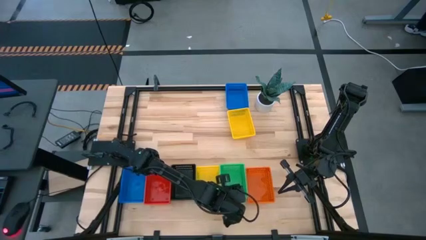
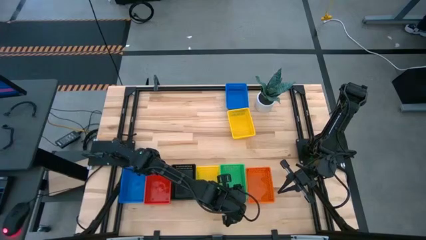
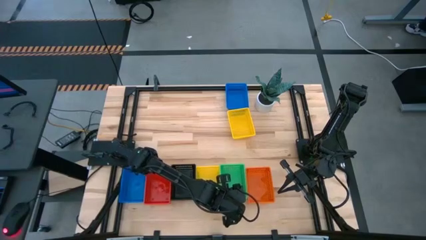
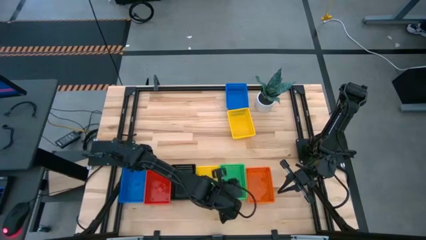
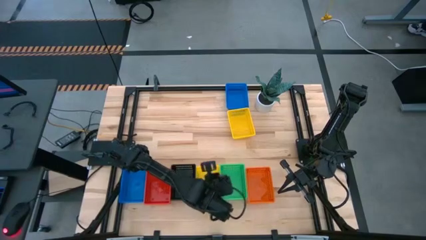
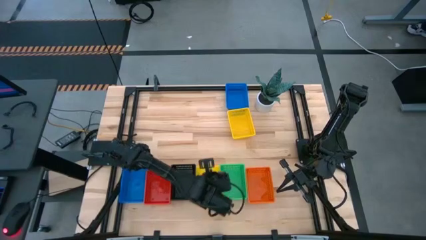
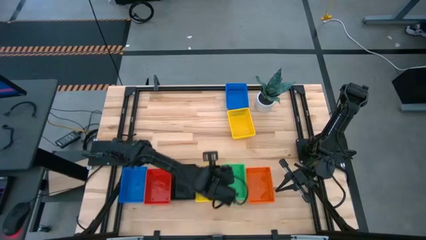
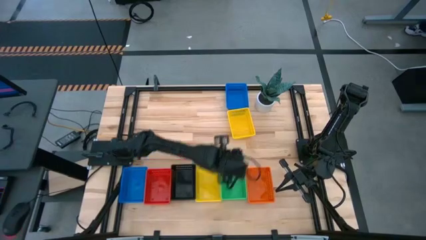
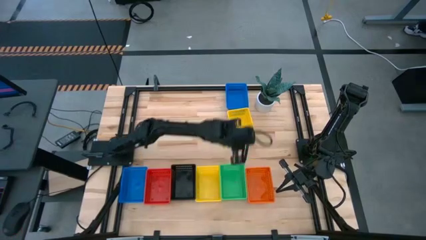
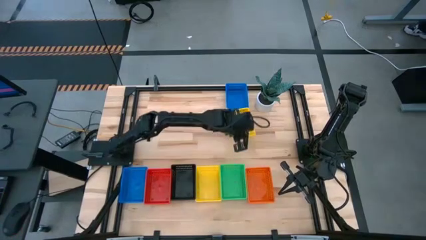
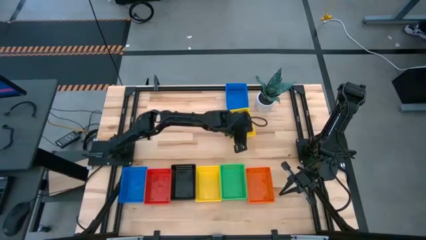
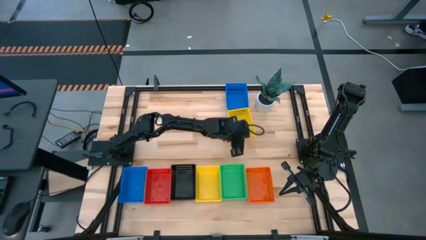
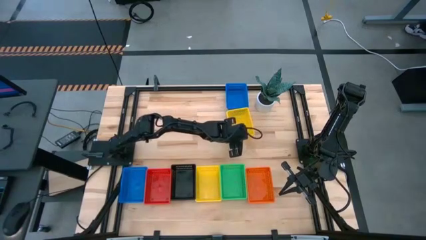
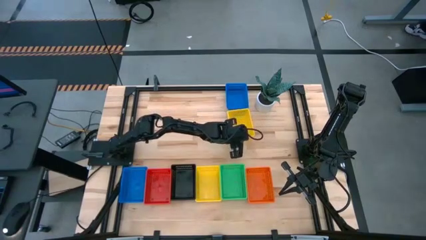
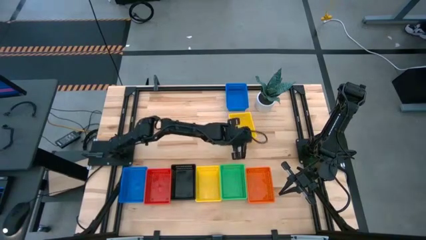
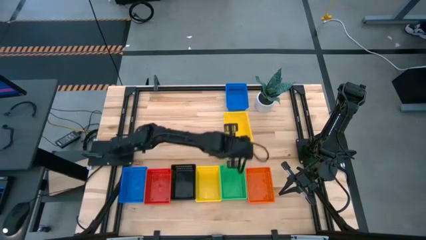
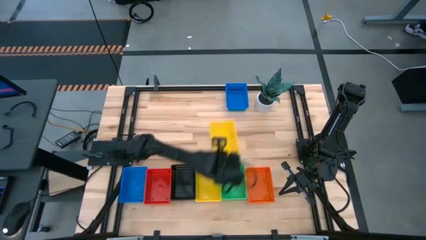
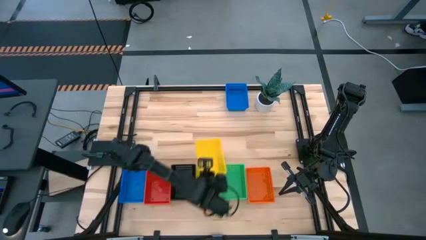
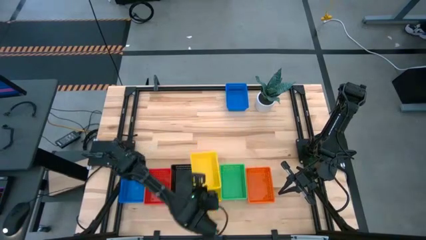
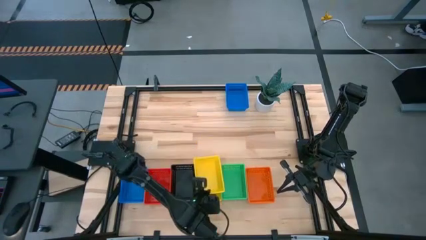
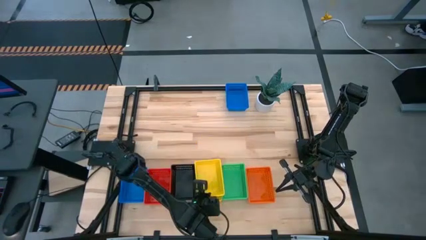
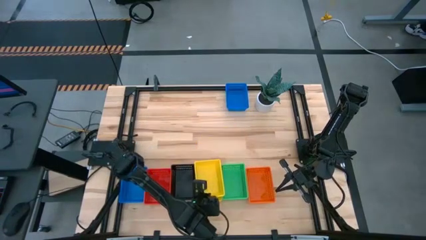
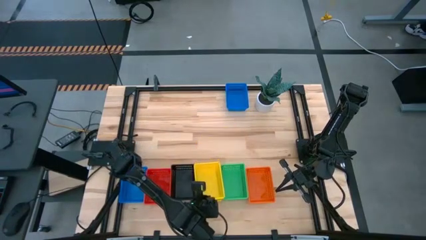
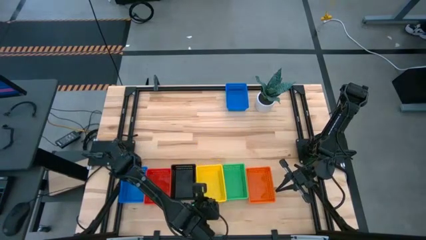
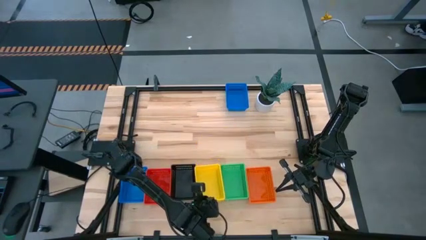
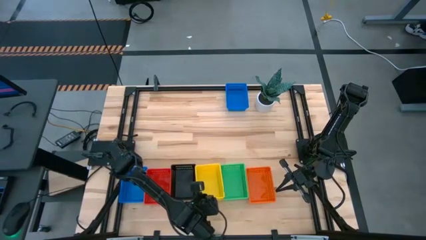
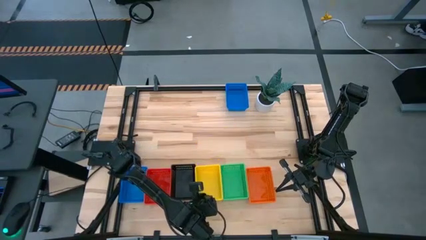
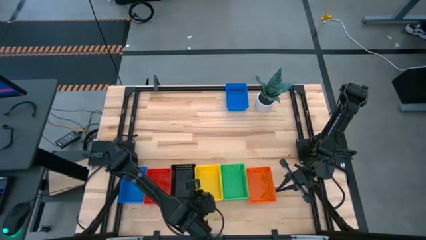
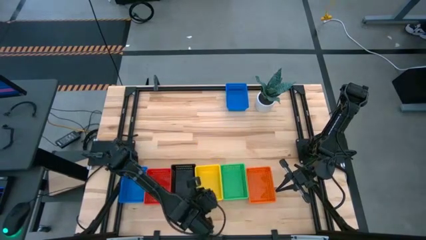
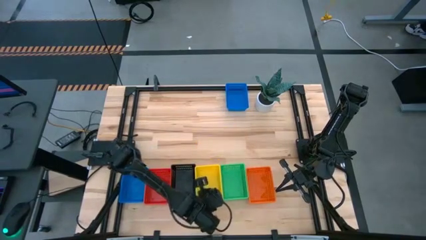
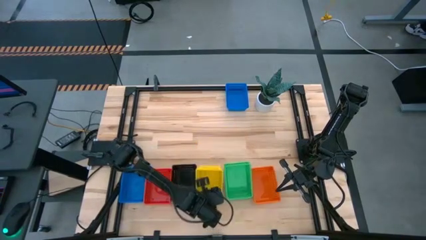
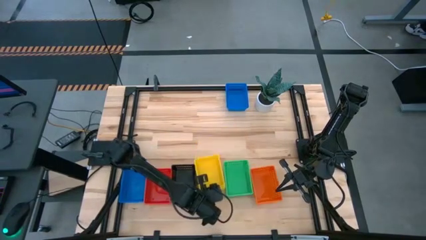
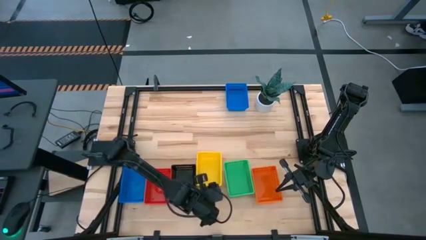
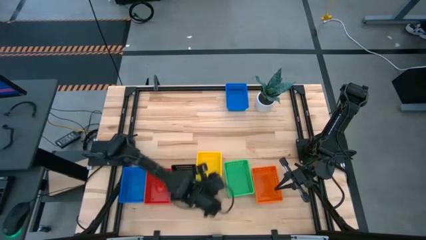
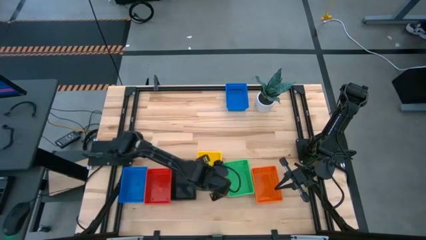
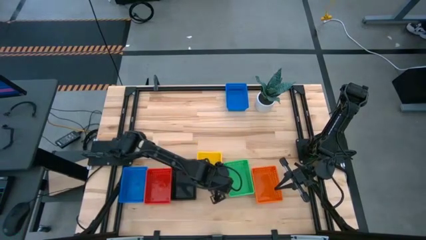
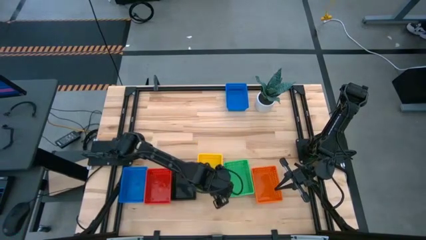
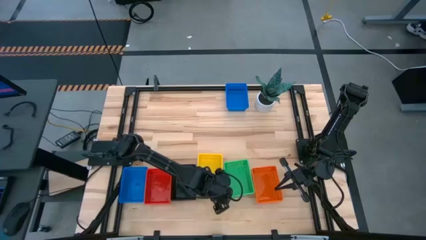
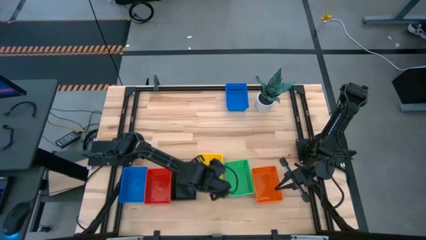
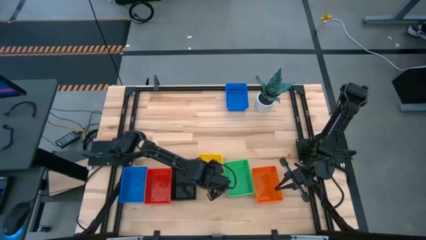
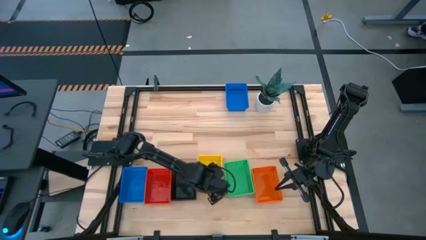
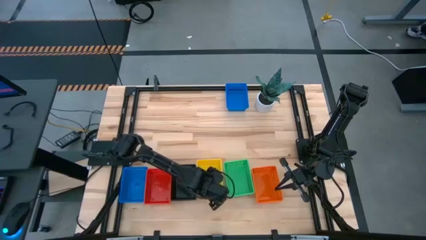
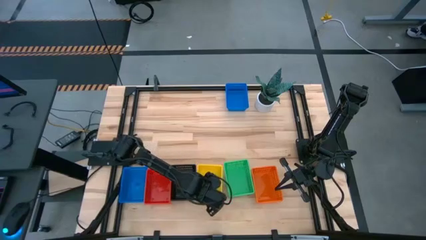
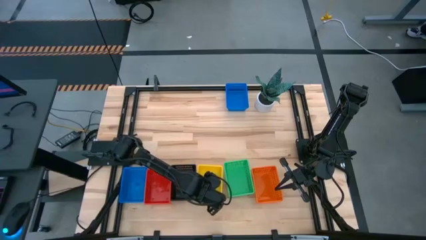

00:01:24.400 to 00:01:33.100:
Stack the top yellow bin on top of the yellow bin

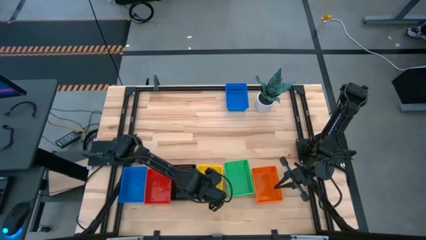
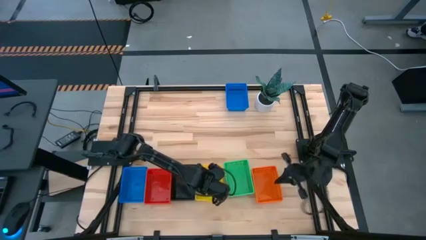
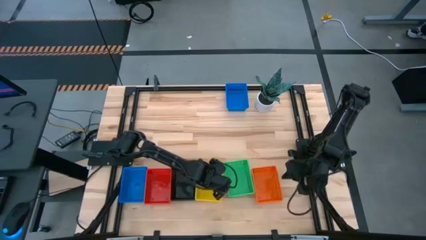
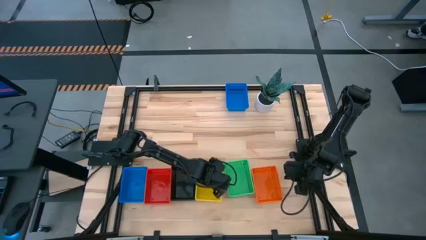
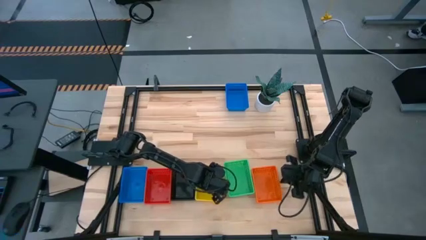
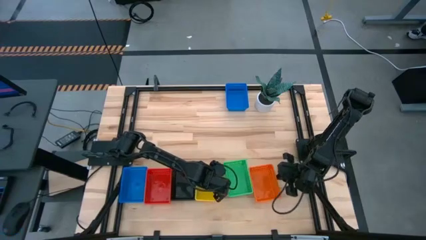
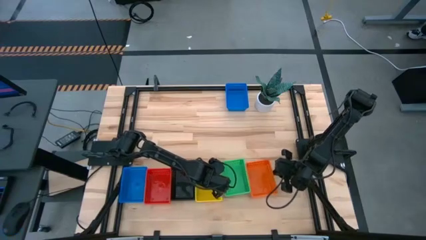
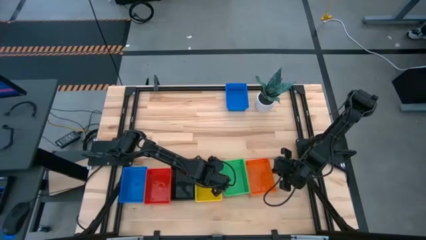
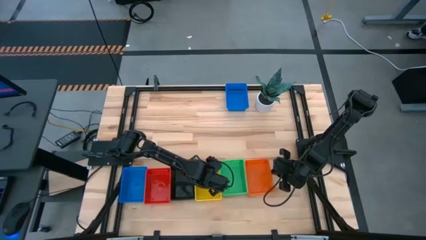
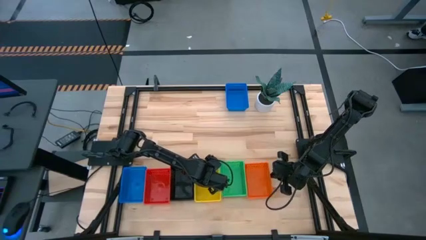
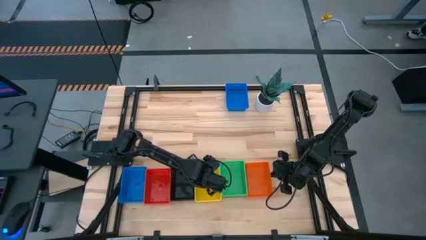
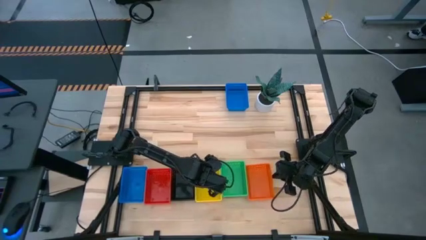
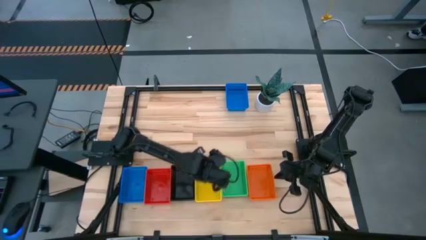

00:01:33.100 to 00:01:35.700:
Adjust the colored bins
